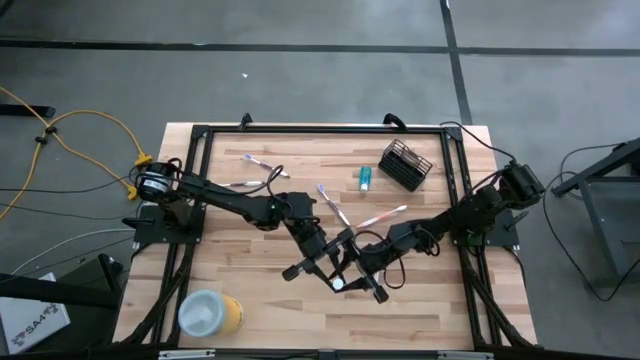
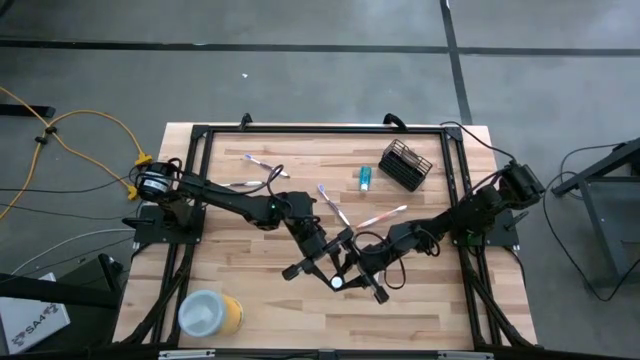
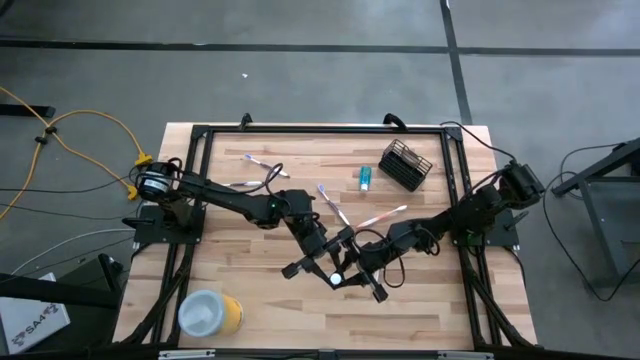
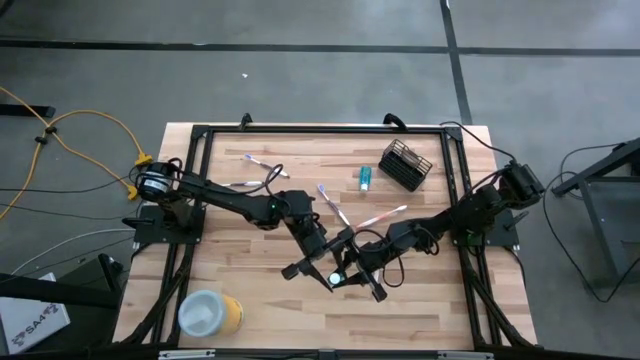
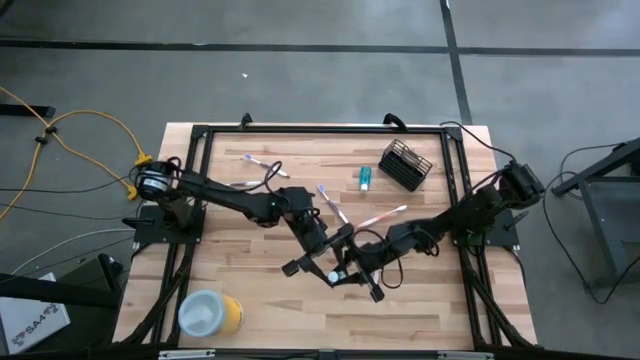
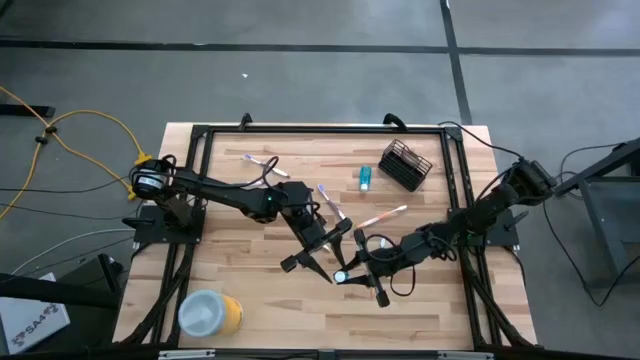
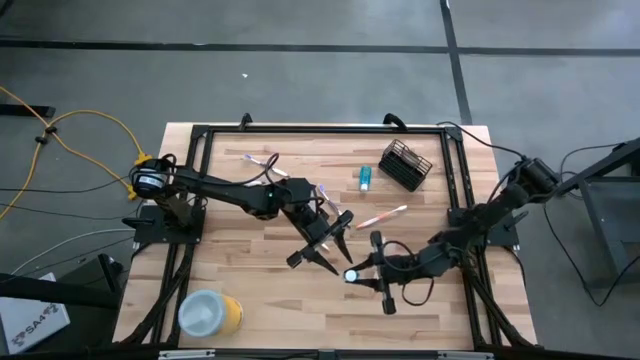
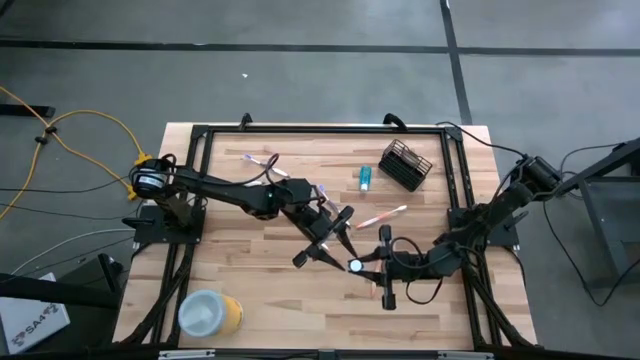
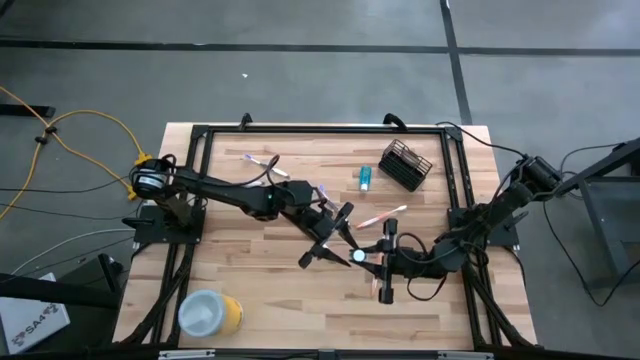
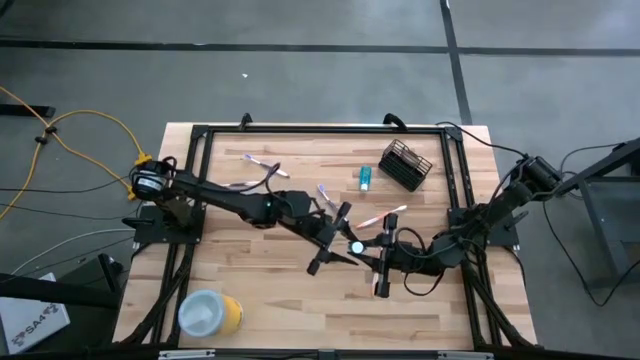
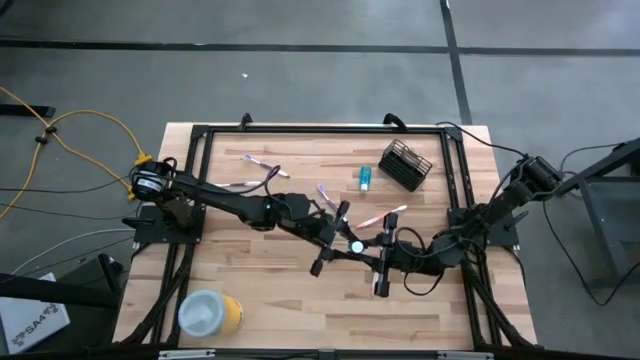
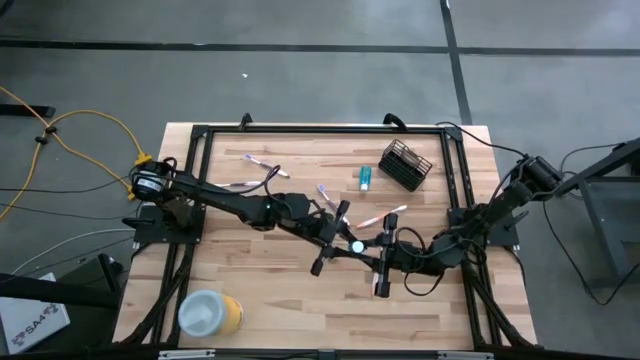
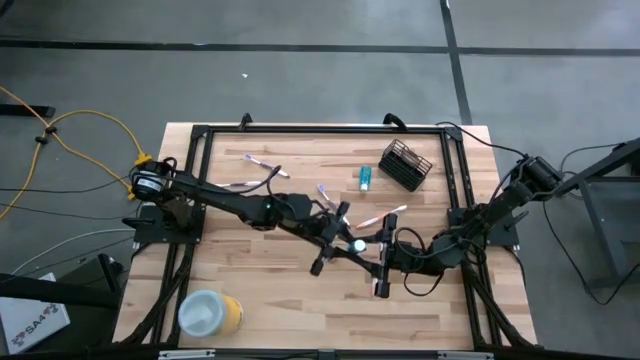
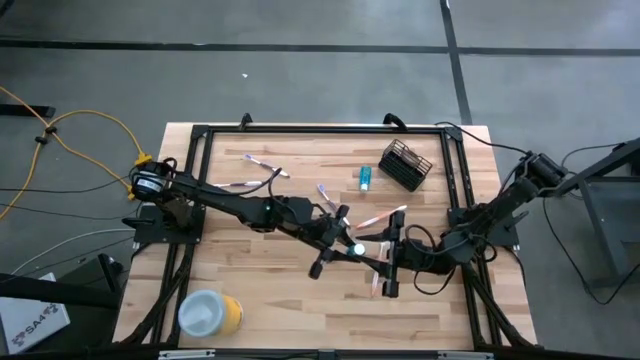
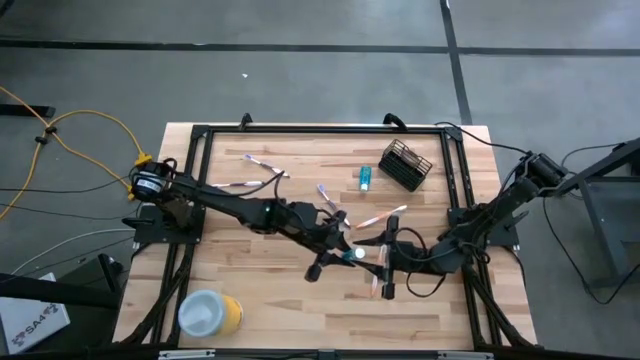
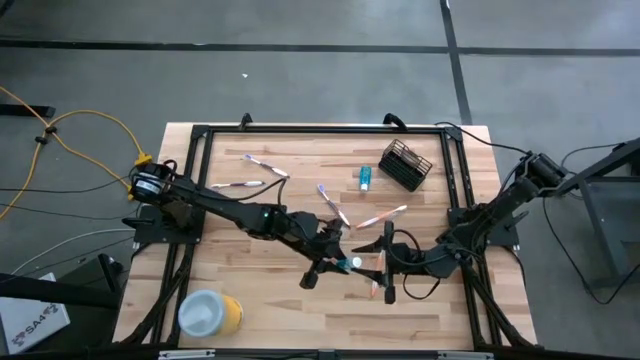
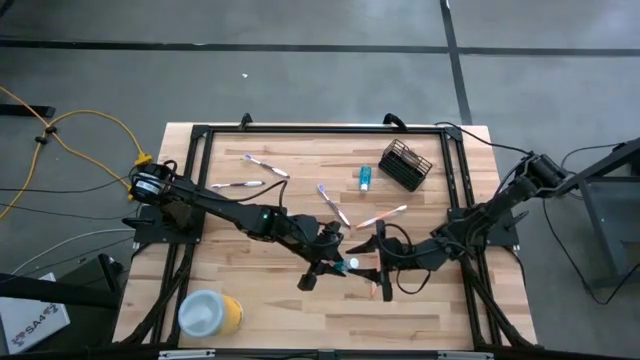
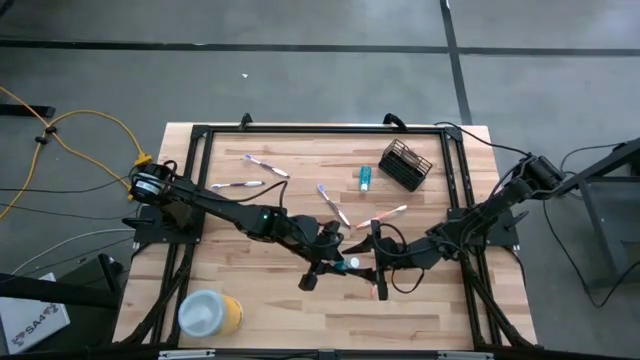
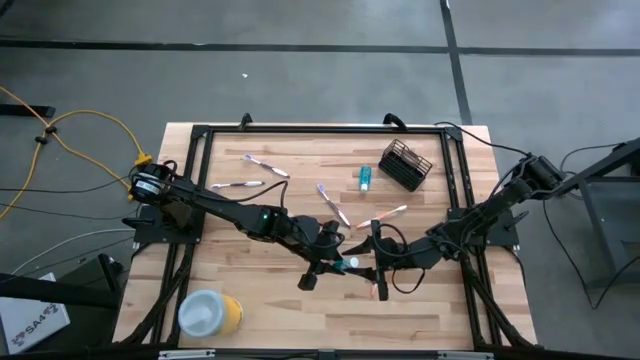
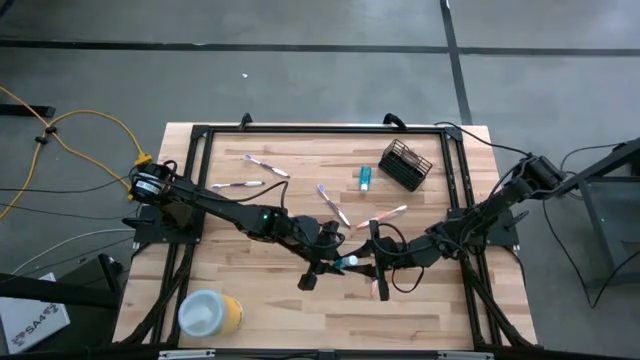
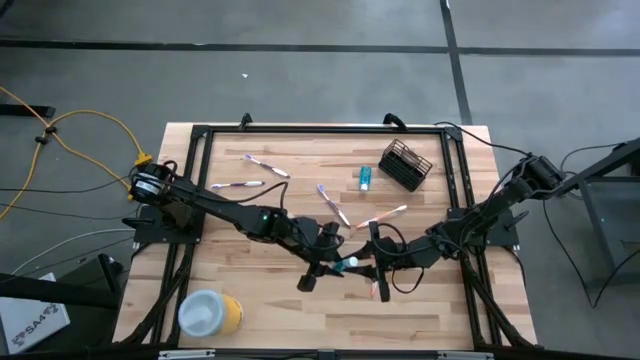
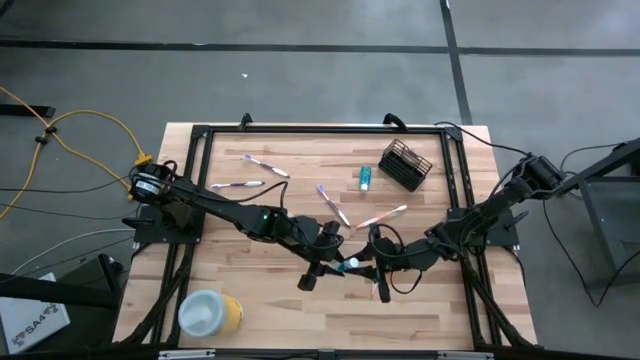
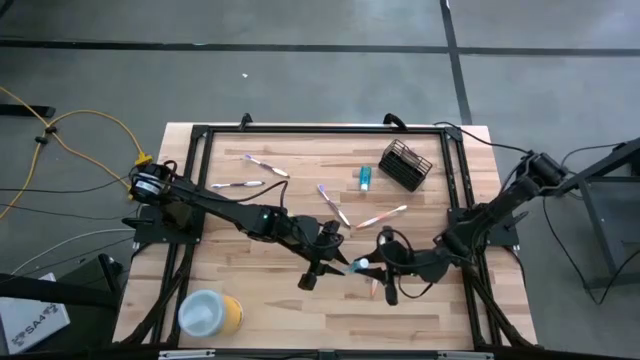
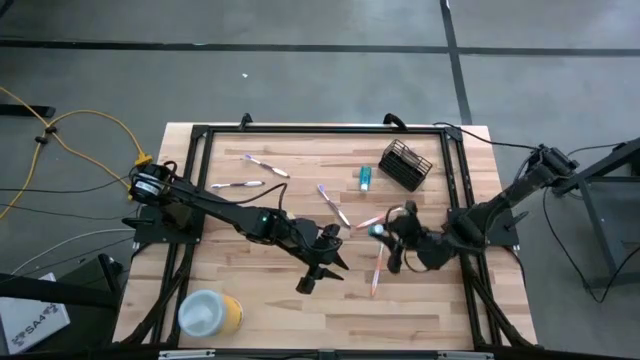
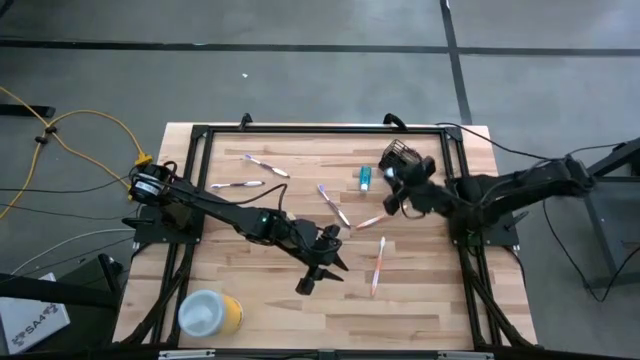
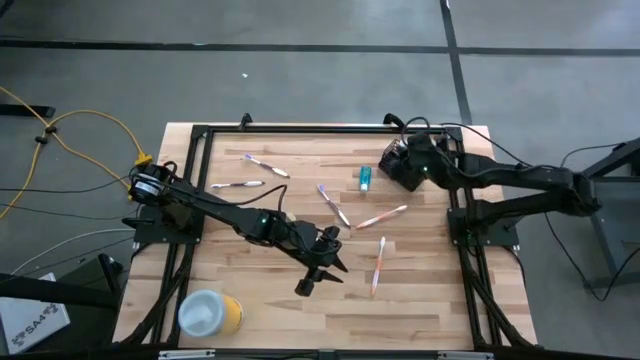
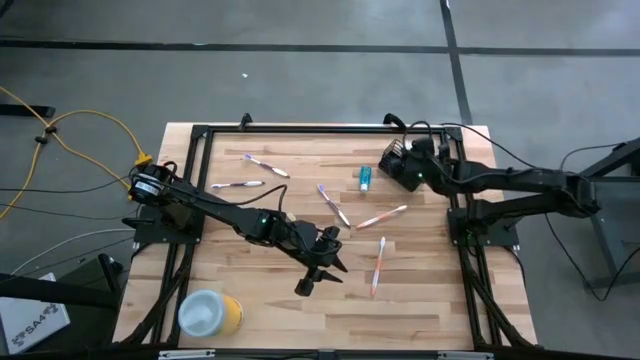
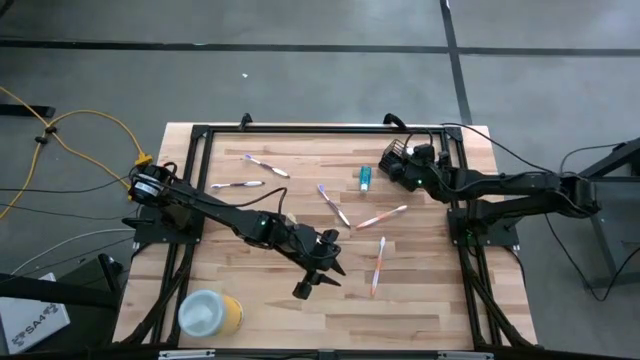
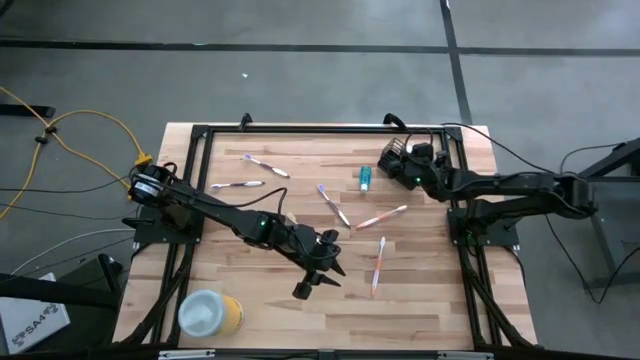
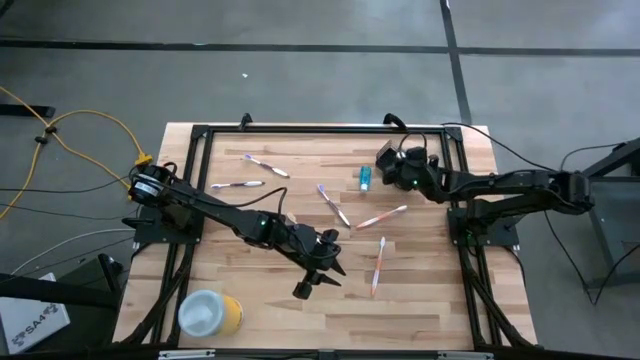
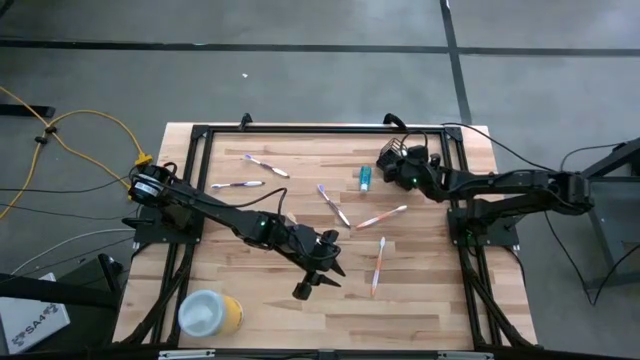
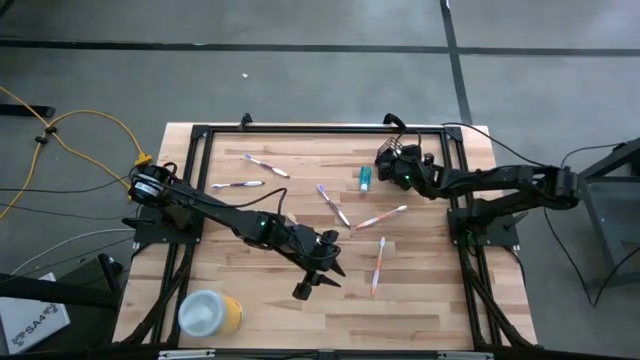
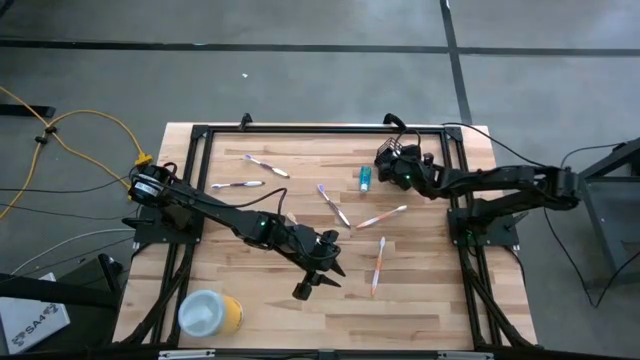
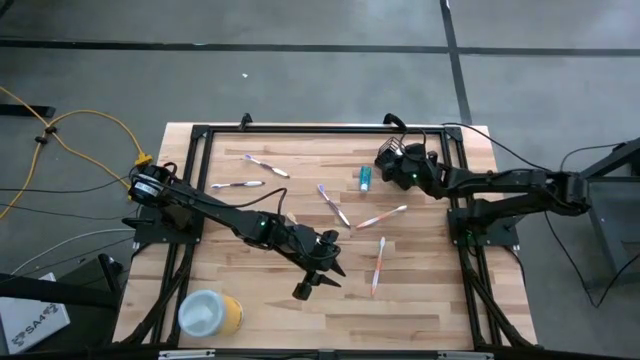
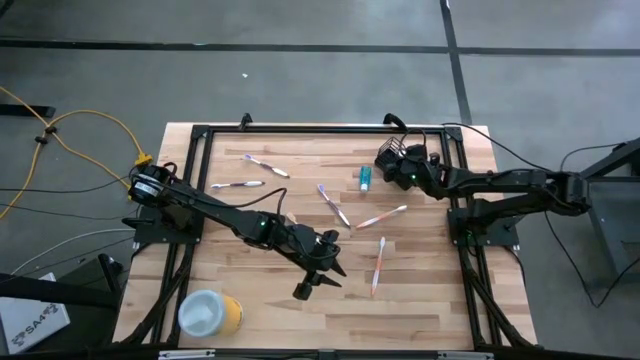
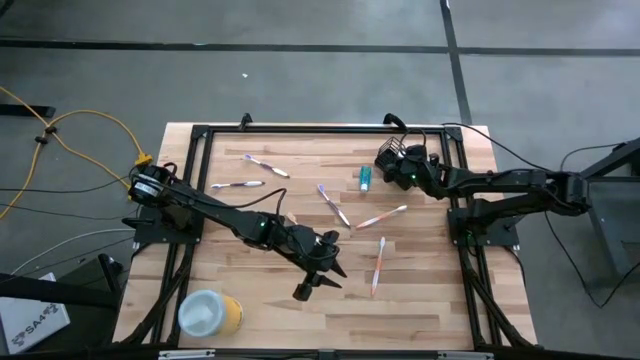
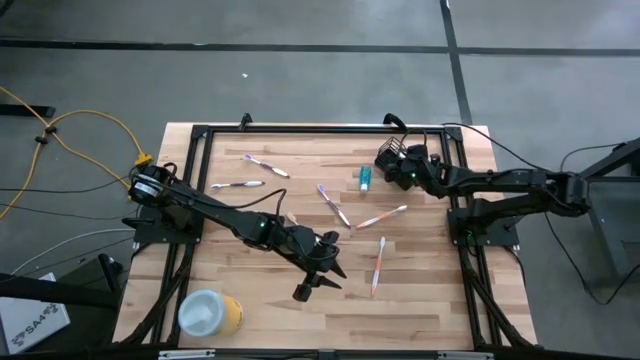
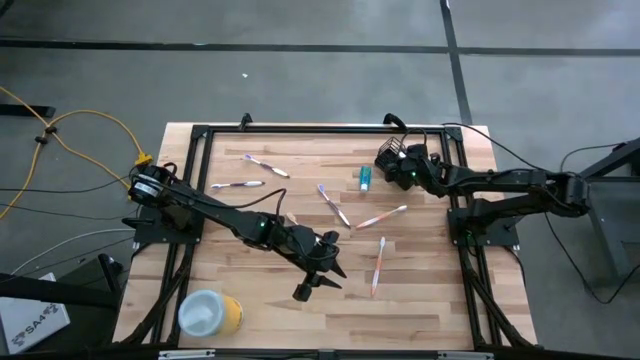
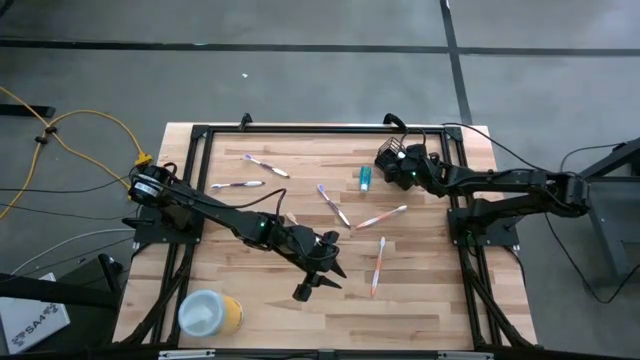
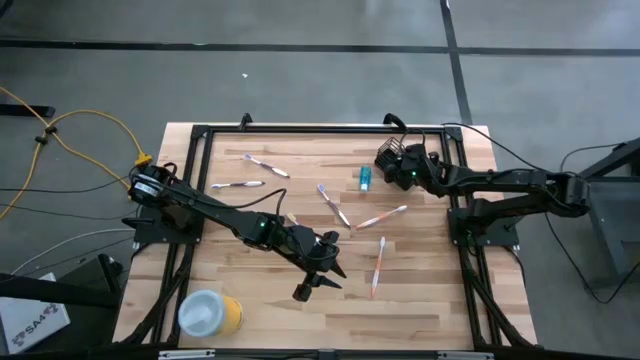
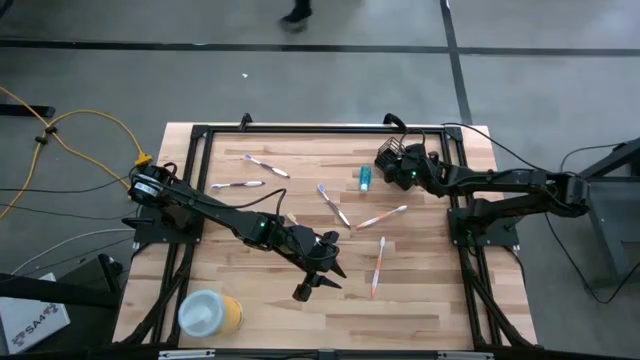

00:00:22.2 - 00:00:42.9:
Task: Pick & Place toothbrushing station
Put the bottom blue mouthwash bottle into the middle of the black mesh organizer
